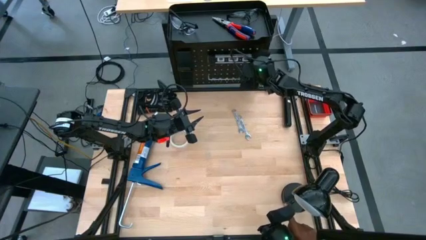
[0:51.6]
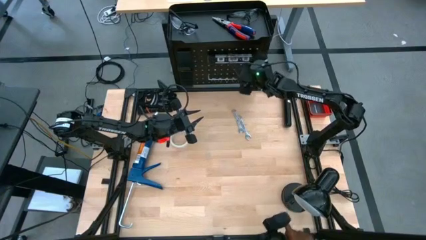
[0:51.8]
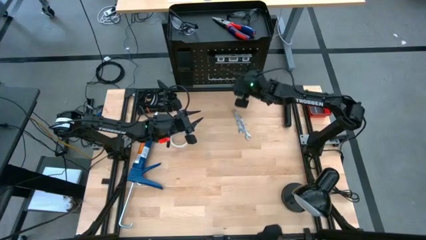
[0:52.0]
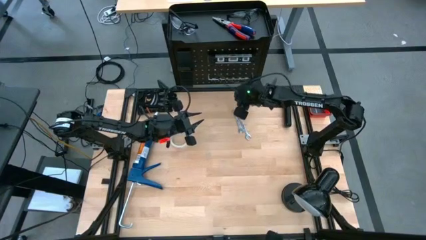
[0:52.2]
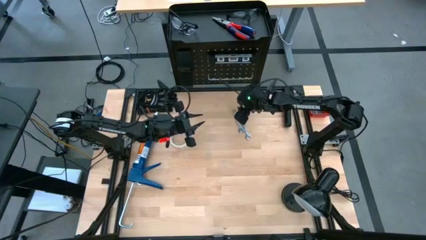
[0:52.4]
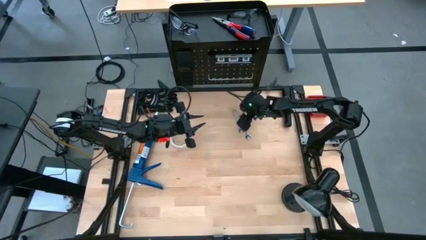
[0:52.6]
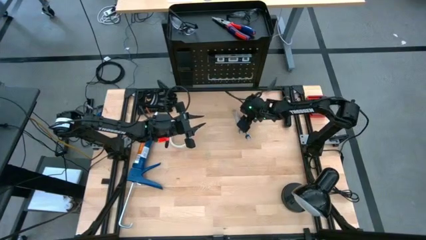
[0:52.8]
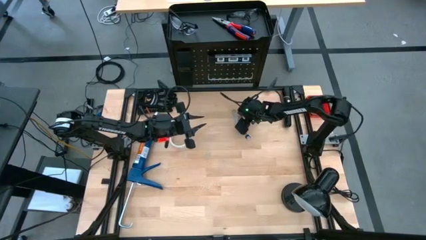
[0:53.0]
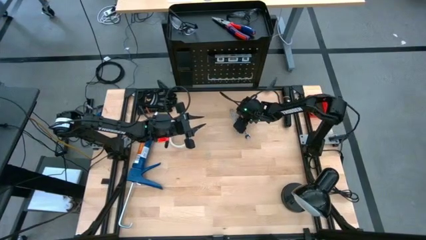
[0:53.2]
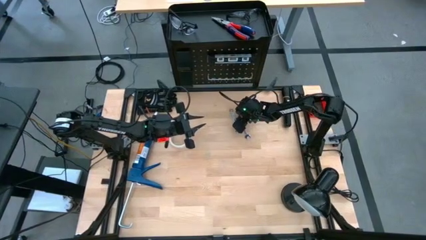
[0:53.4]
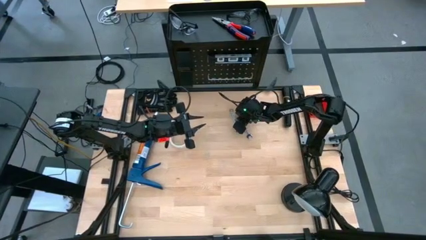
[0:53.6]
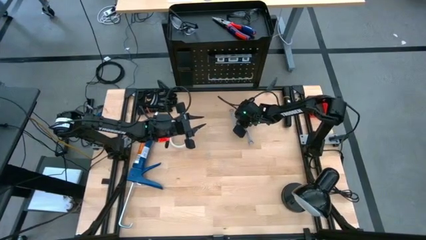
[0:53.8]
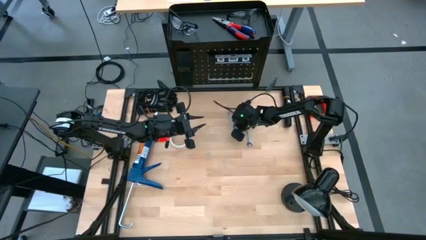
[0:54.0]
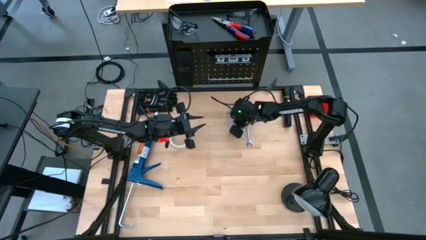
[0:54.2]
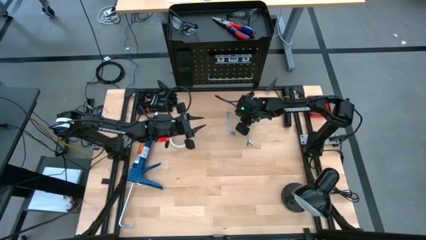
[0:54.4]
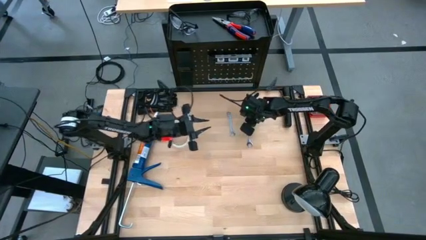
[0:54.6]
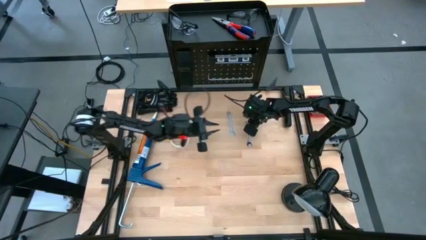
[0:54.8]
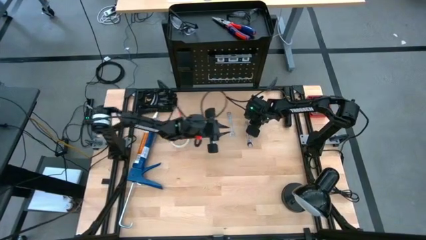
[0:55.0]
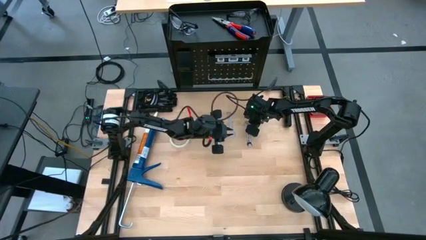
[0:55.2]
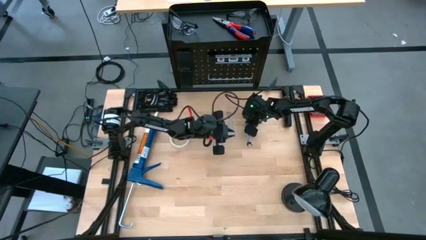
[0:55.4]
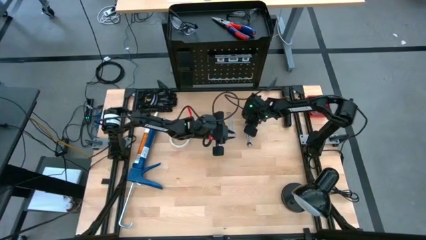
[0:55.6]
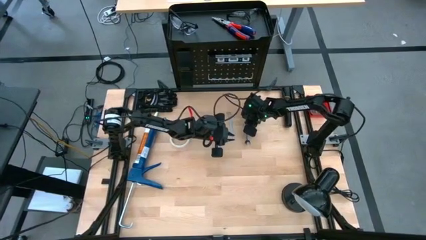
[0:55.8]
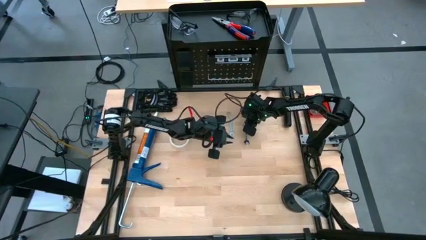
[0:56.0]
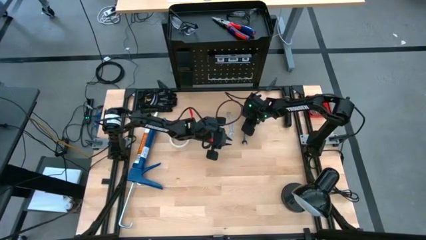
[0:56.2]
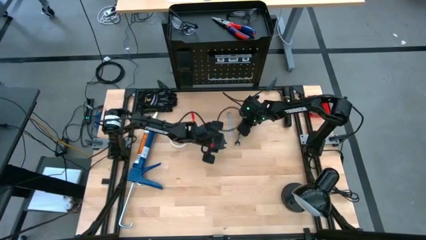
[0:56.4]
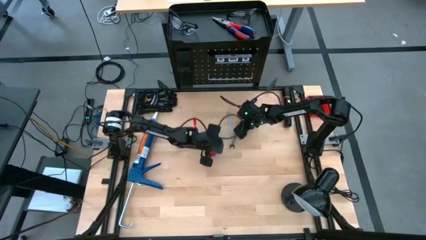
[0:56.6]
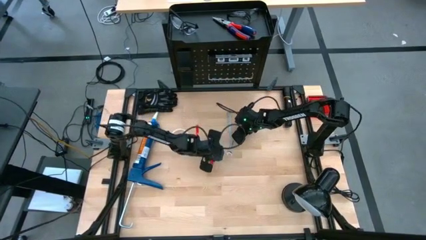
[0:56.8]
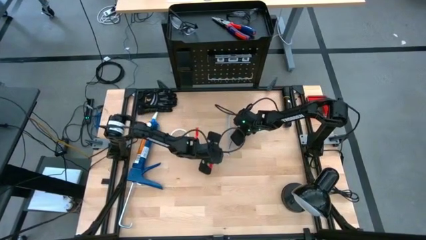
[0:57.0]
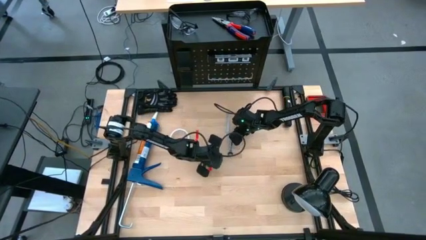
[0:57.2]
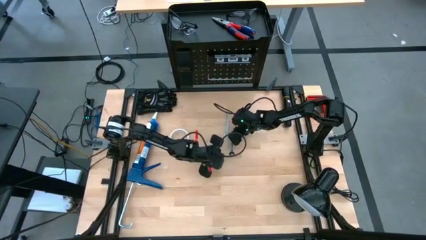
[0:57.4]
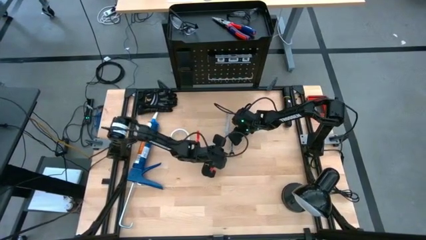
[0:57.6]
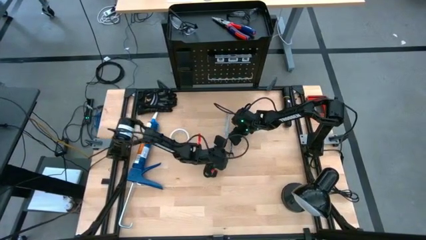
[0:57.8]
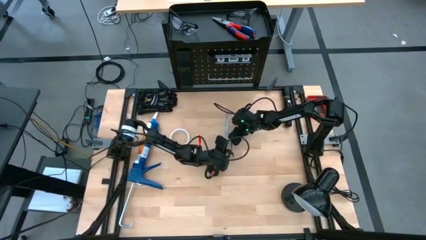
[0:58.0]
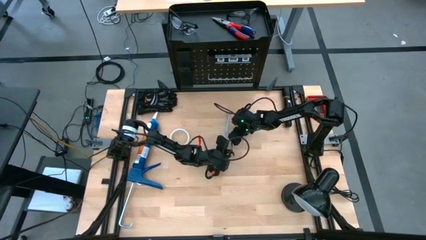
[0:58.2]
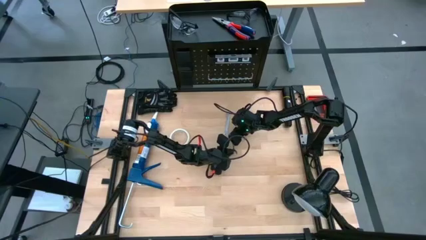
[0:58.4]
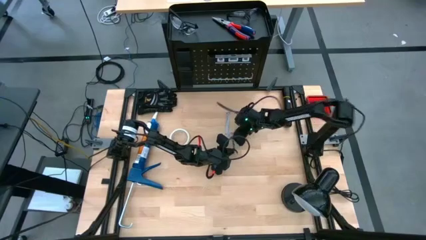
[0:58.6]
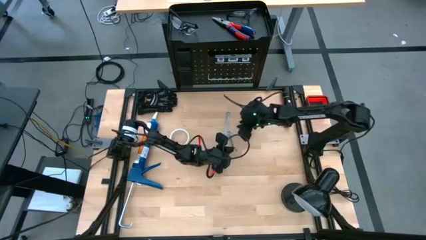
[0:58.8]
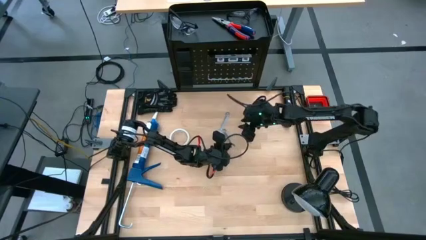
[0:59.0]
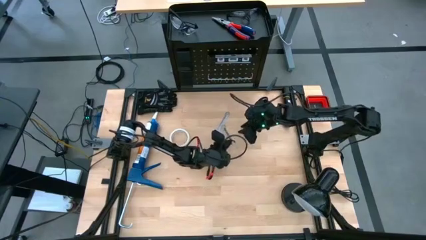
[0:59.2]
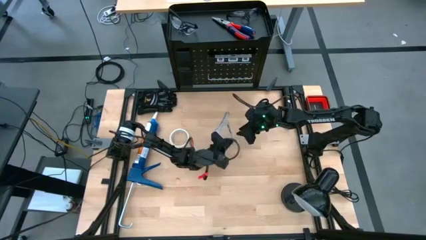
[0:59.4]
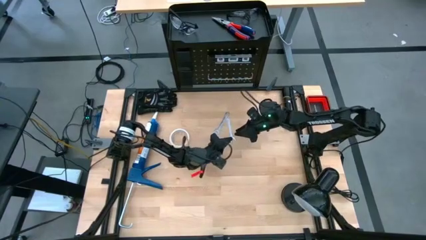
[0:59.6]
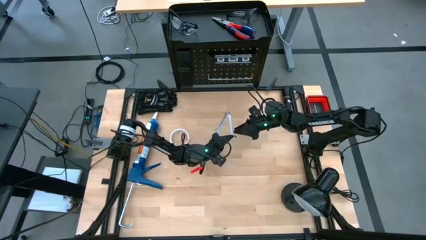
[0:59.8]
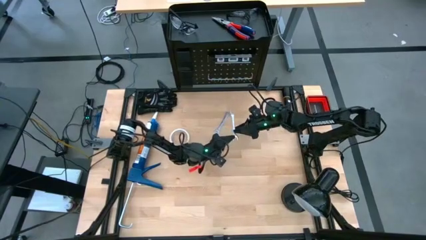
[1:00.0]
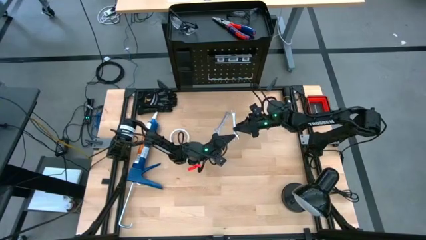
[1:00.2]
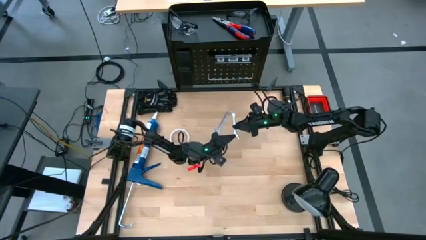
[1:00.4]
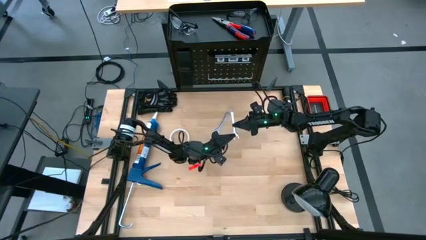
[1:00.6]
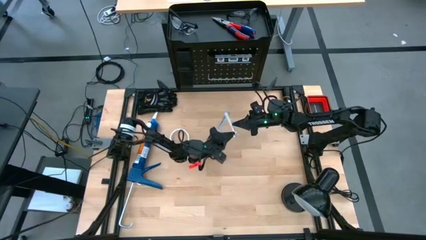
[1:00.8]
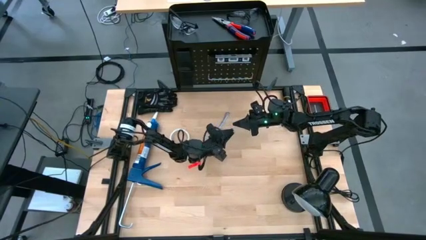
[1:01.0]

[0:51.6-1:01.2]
Task: Hang tools onto peg board
Hang the bottom wrench on the peg board

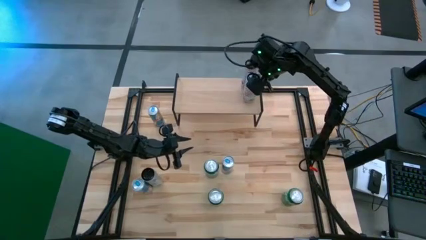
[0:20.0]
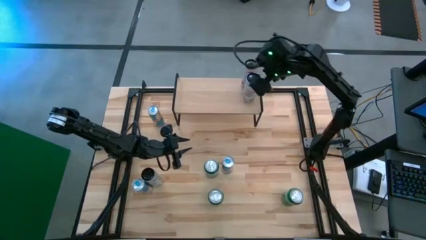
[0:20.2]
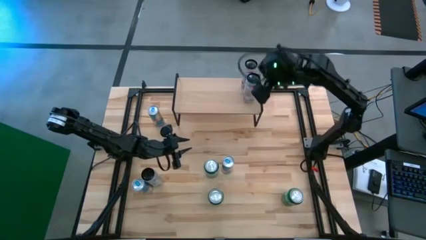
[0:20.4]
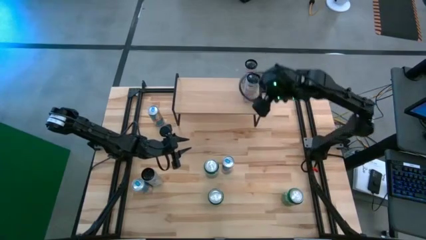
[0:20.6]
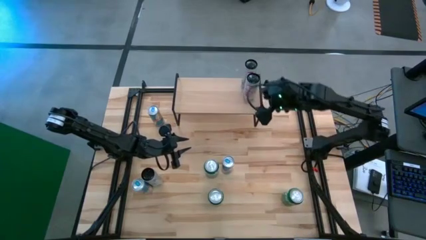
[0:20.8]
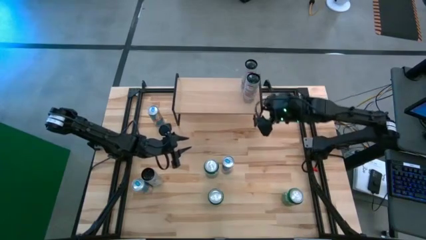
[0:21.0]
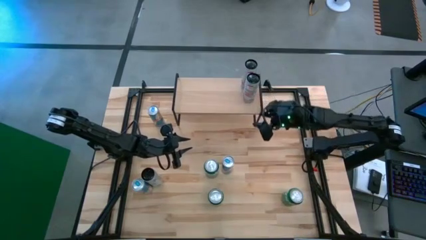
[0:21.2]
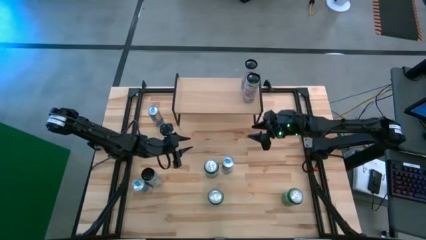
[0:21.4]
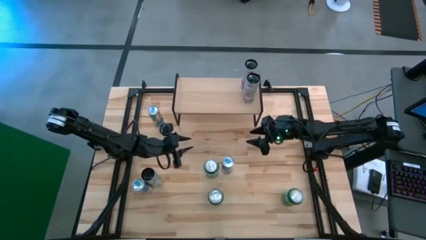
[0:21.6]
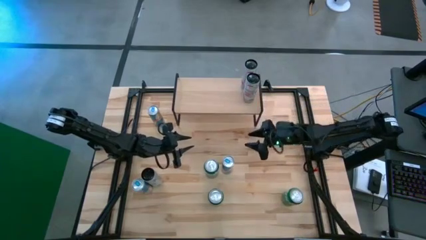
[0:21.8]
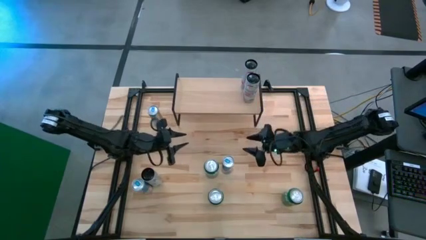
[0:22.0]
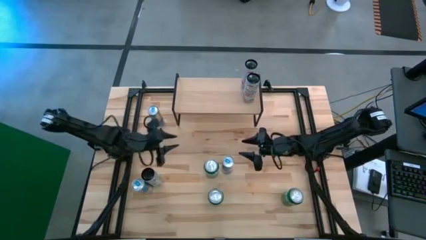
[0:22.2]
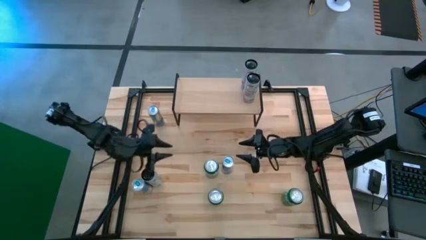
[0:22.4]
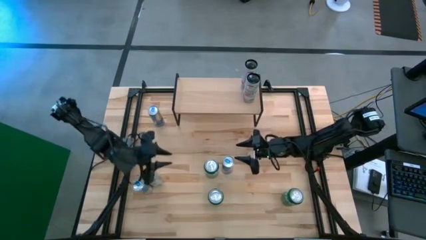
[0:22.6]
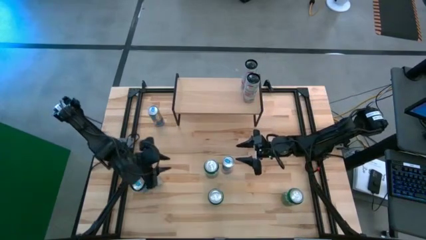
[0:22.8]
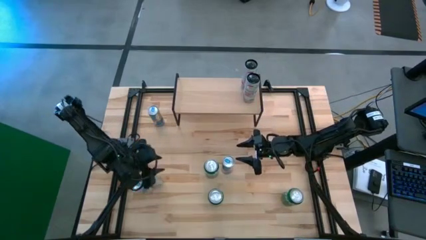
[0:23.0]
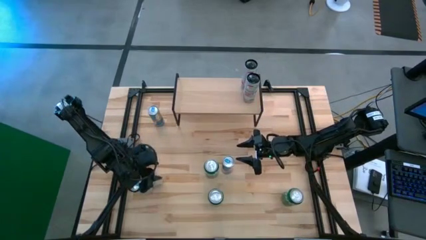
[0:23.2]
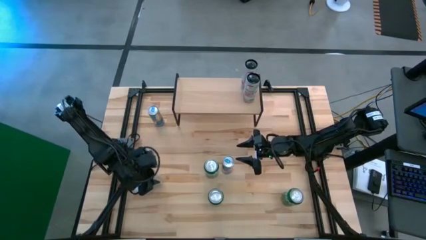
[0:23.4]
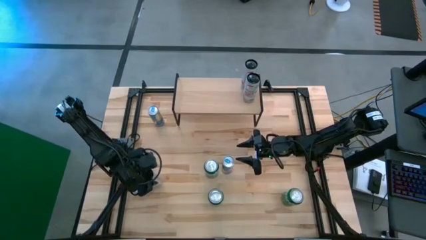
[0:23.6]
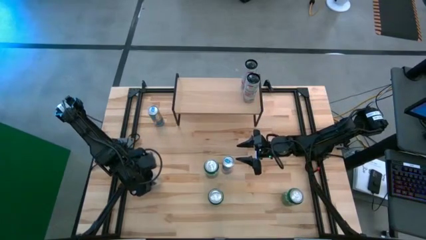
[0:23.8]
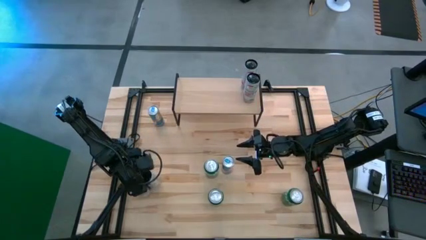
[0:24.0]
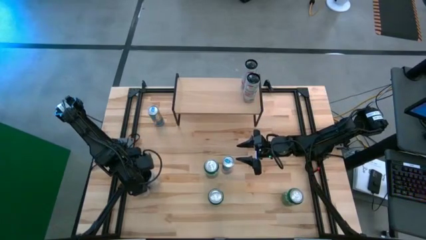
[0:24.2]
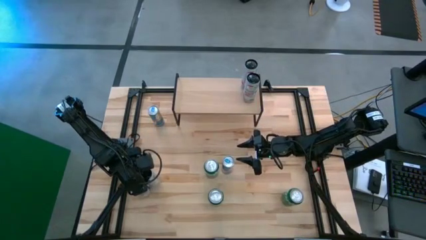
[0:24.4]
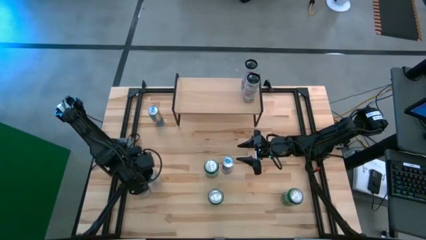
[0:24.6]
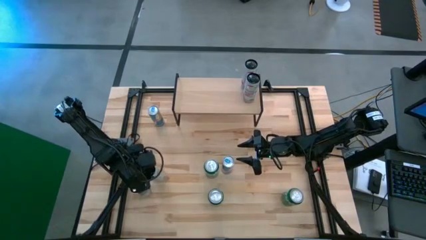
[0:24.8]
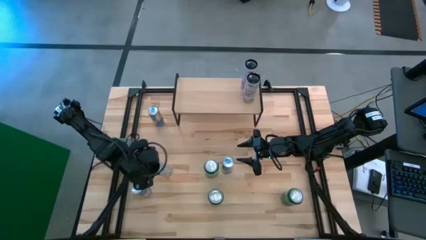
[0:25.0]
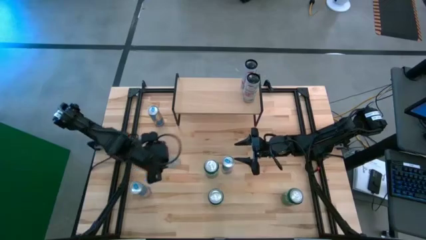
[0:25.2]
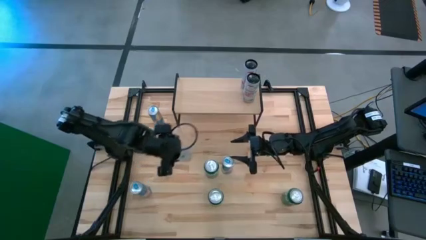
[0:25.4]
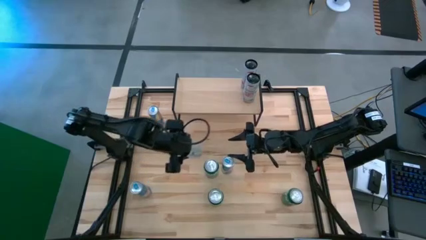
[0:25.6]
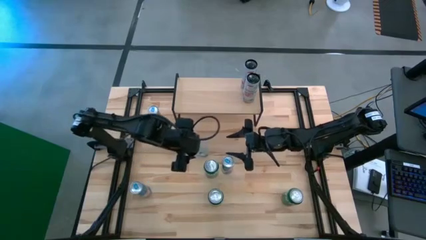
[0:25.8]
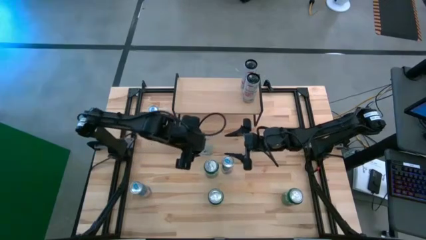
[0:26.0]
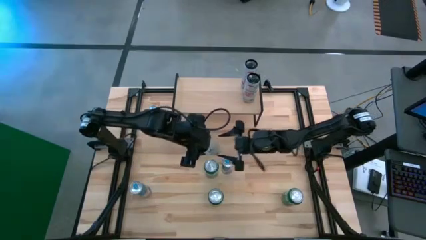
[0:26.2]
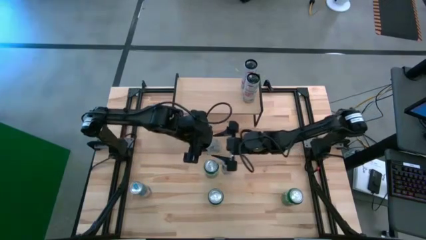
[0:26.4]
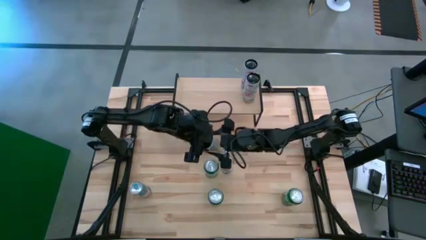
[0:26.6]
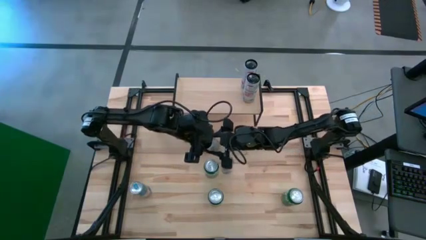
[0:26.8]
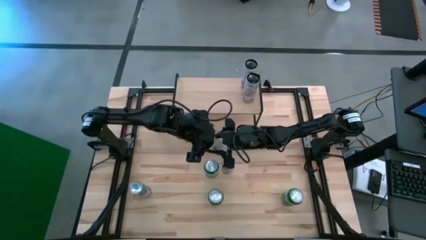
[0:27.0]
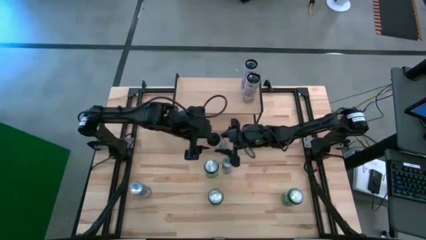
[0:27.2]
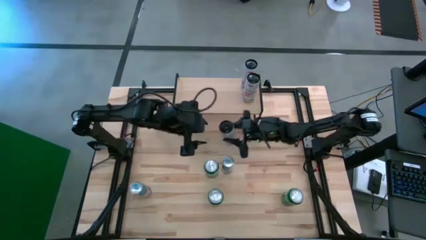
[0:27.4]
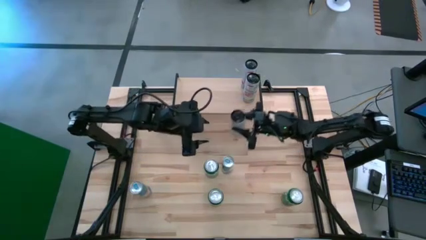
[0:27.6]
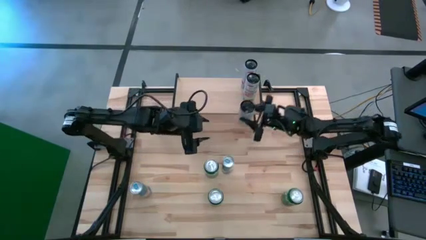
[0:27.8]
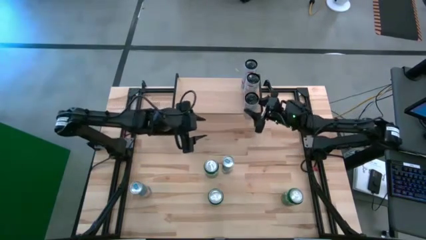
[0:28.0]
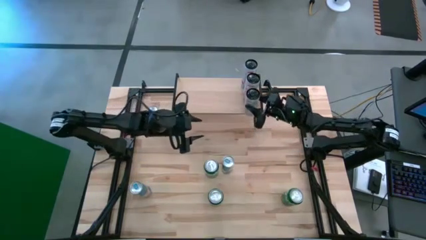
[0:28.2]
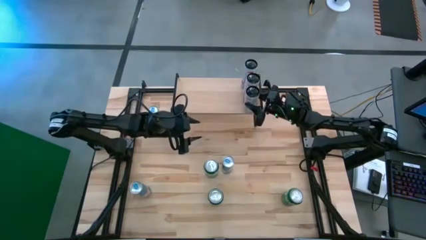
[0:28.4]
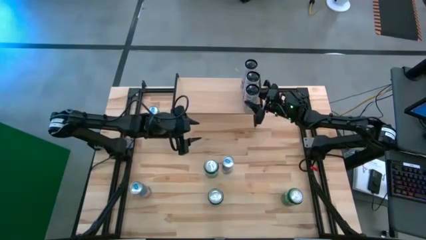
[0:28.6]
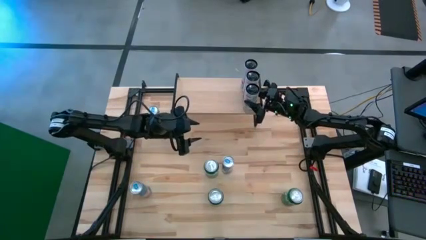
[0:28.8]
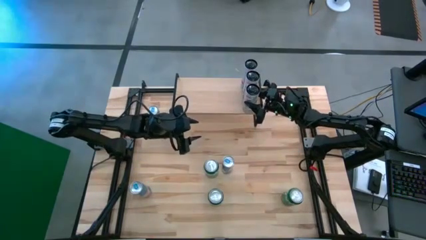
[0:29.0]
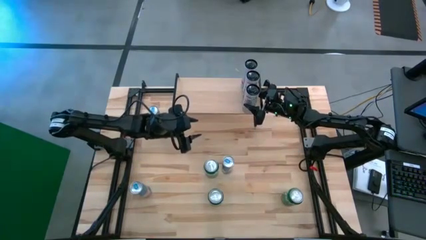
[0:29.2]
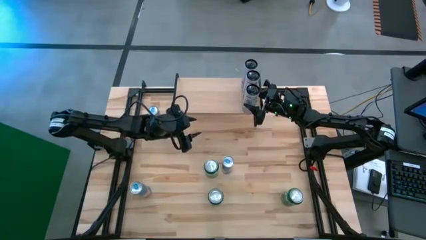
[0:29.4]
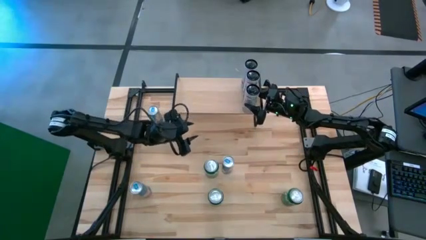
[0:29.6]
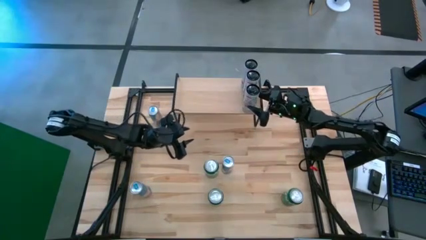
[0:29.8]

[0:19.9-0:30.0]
Task: Place canned beverage on shelf
Put the white-pink soda can on the shelf aligned with the other white-pink soda can
